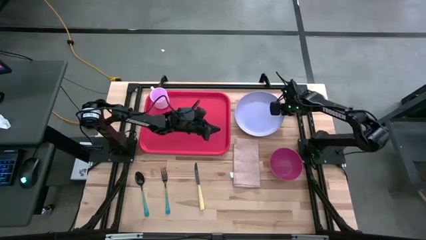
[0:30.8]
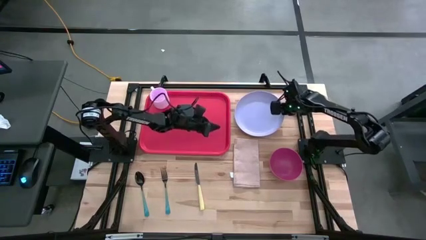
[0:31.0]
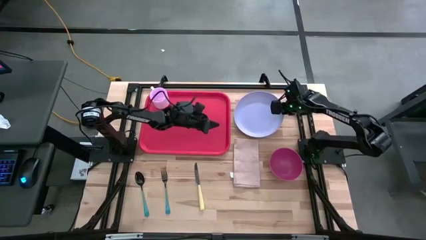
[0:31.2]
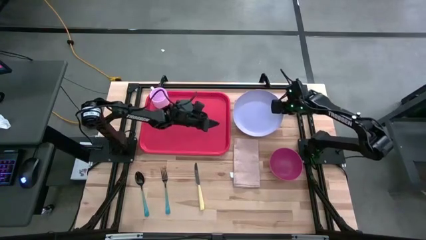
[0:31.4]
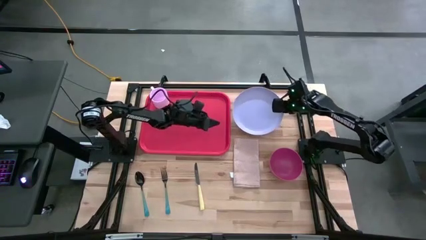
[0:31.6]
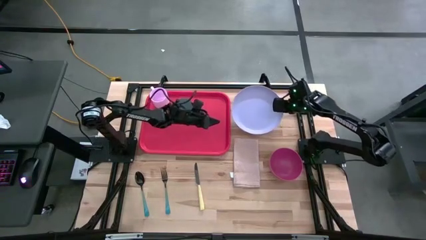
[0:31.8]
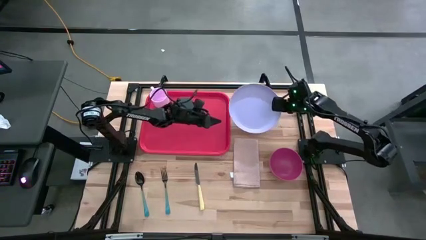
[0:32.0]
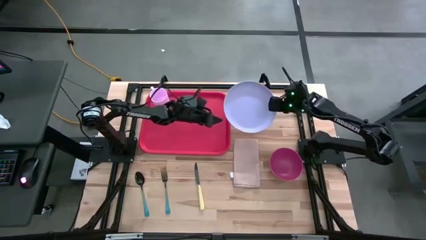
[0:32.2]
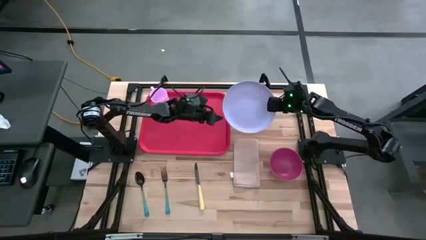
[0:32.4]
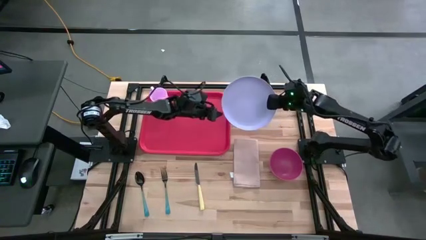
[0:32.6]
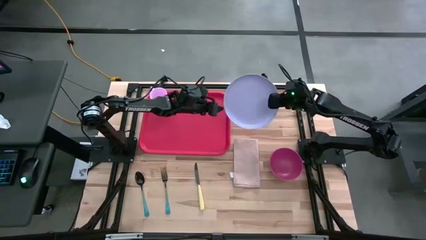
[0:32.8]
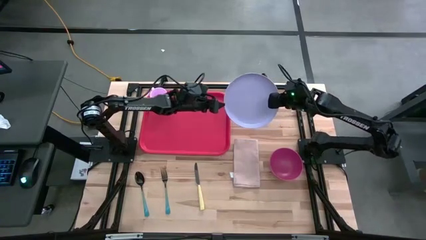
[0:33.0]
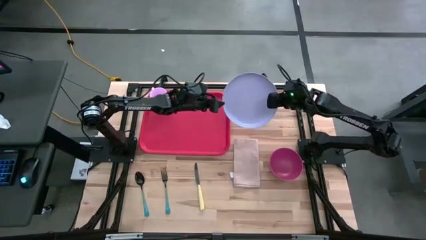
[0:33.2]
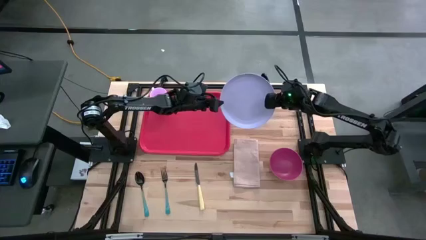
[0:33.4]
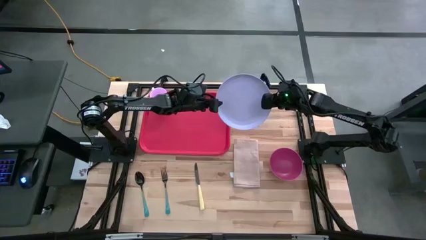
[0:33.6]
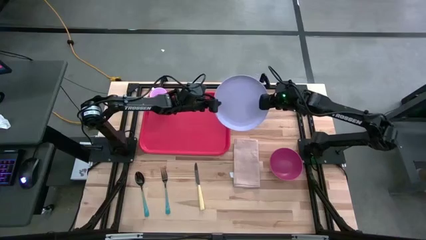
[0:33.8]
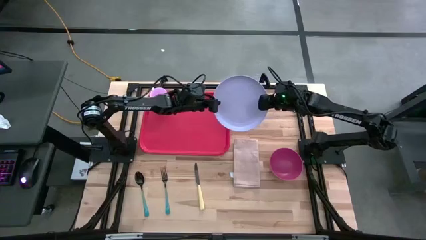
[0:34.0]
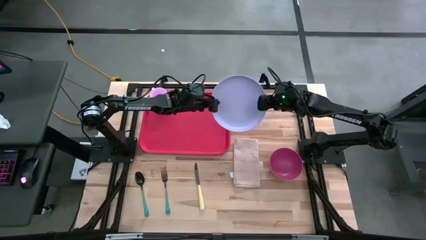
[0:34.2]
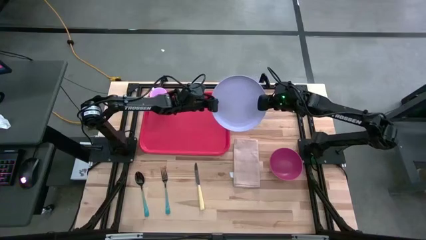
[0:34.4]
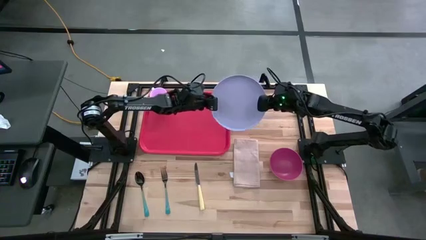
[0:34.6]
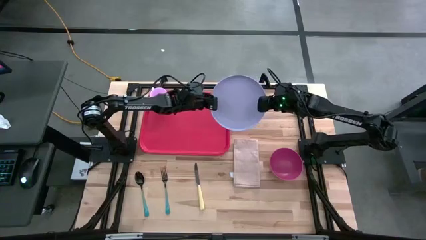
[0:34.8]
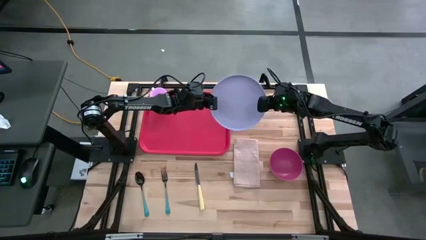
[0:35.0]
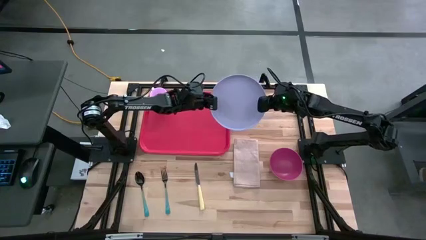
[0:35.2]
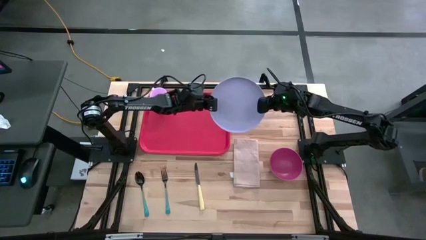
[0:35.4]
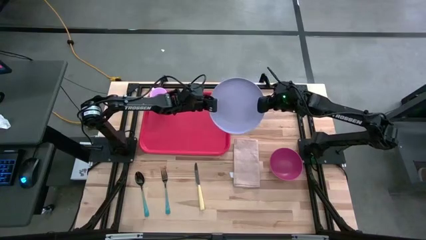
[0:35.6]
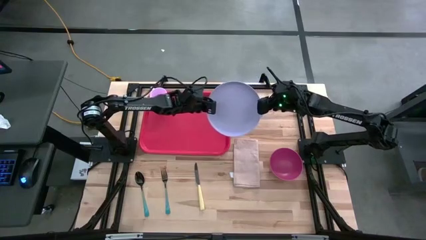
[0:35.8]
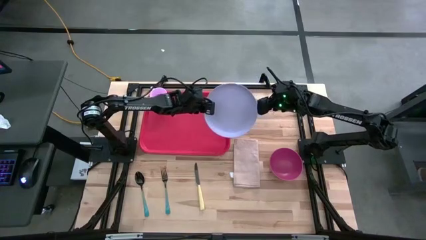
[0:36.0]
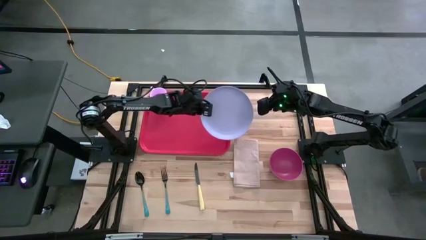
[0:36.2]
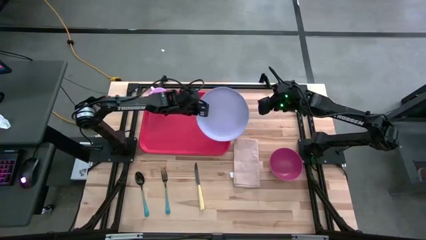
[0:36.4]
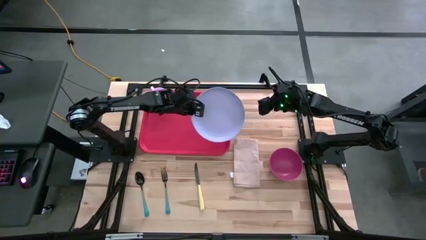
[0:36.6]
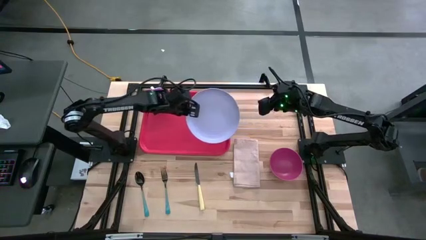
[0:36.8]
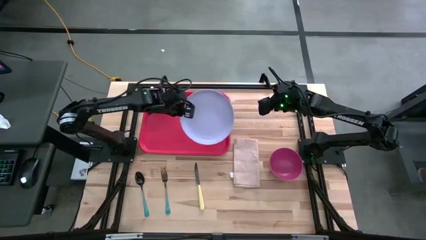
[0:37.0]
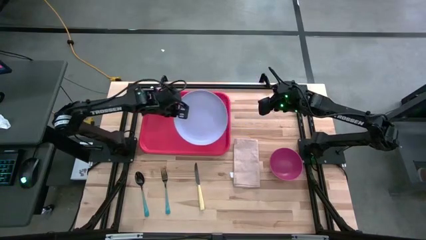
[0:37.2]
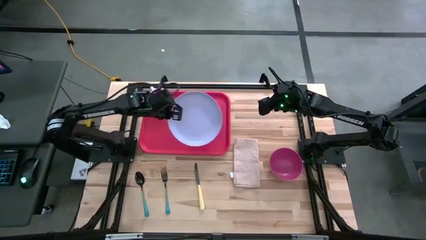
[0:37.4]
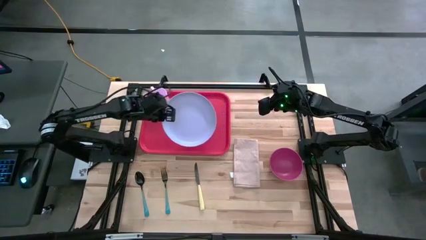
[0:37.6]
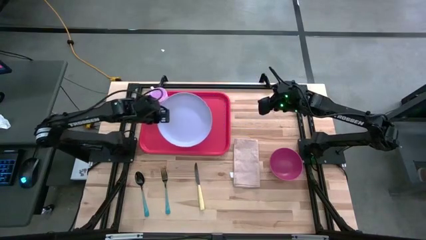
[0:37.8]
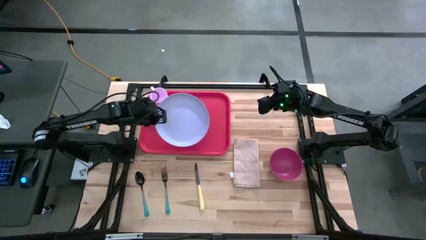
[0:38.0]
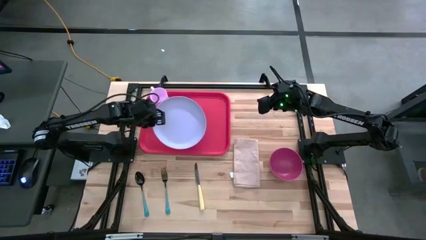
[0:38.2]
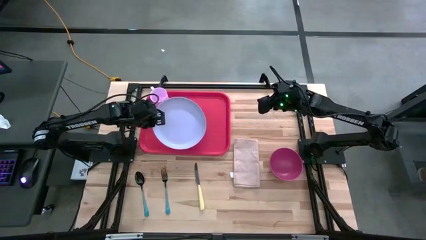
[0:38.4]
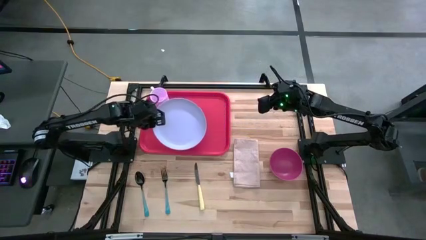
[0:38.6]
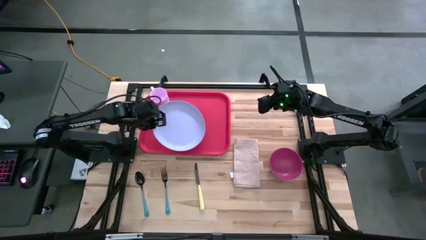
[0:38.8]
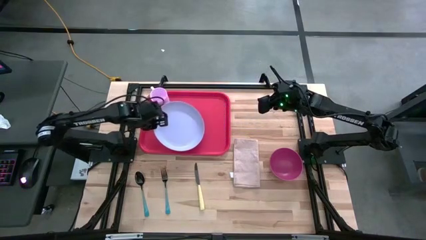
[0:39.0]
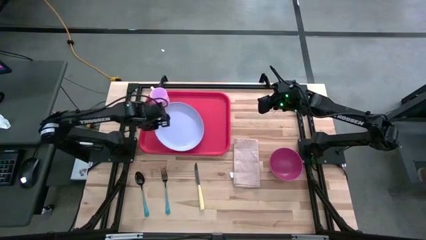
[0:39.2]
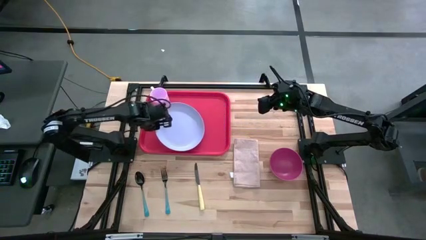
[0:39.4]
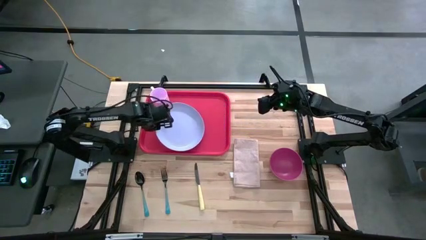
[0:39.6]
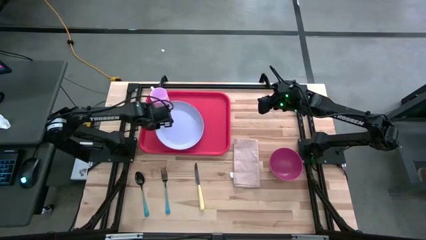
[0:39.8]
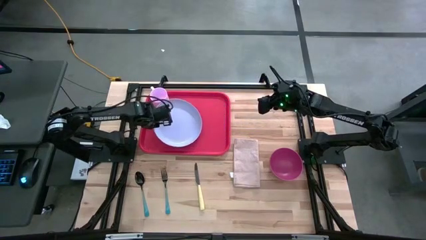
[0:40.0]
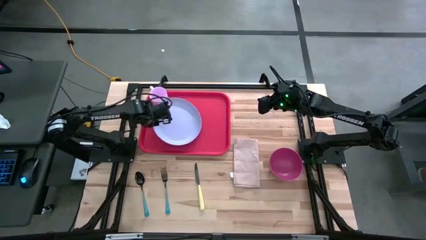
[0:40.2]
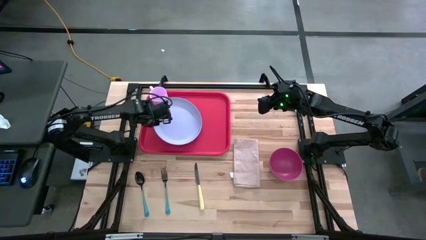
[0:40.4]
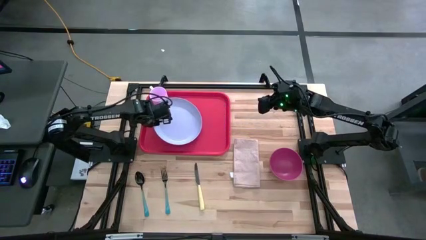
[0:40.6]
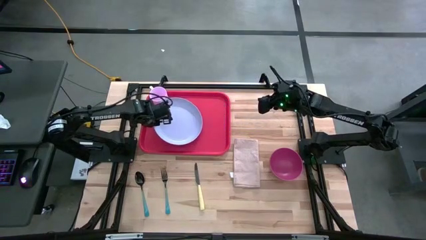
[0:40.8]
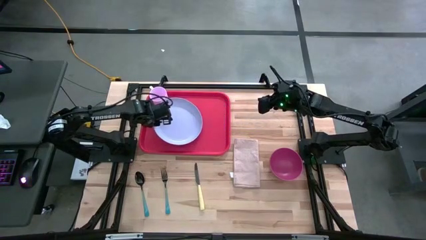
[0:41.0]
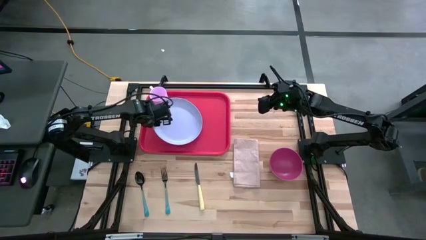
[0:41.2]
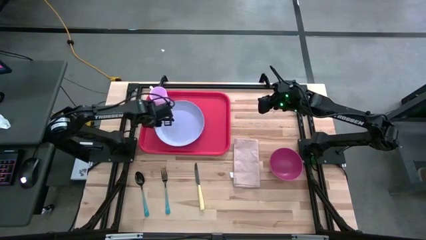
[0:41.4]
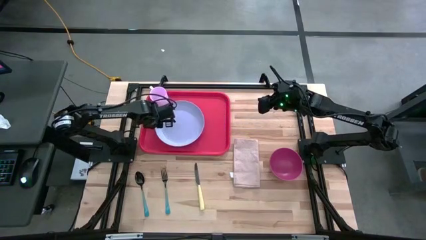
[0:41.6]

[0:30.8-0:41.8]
Task: Set up tray
Put the violet plate below the pink mug on the red tray
